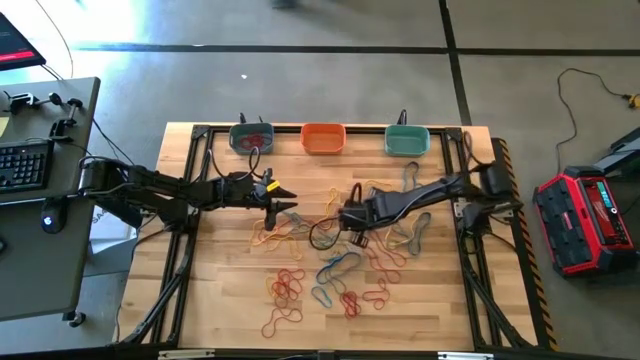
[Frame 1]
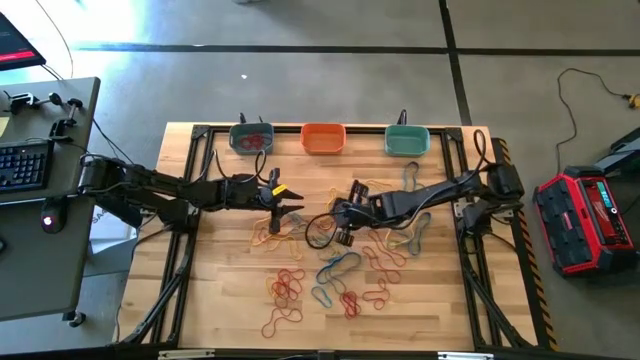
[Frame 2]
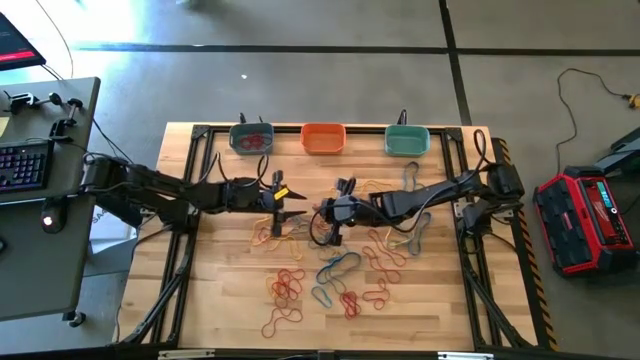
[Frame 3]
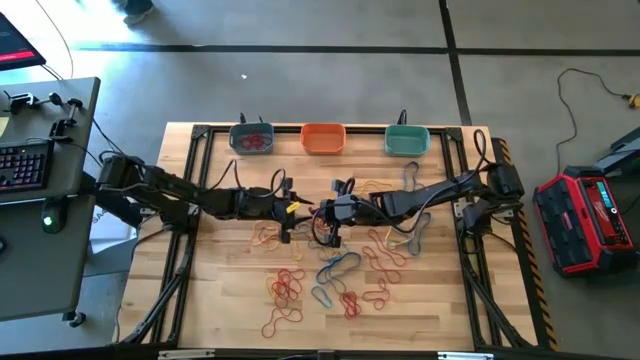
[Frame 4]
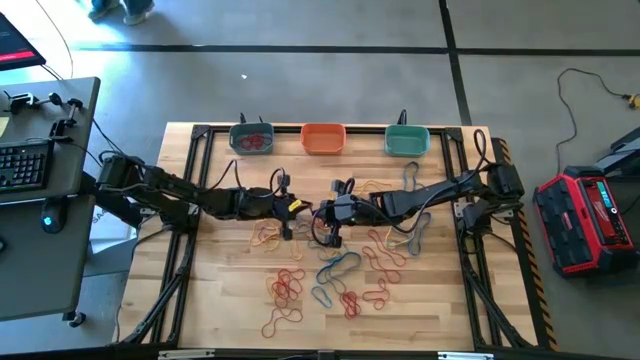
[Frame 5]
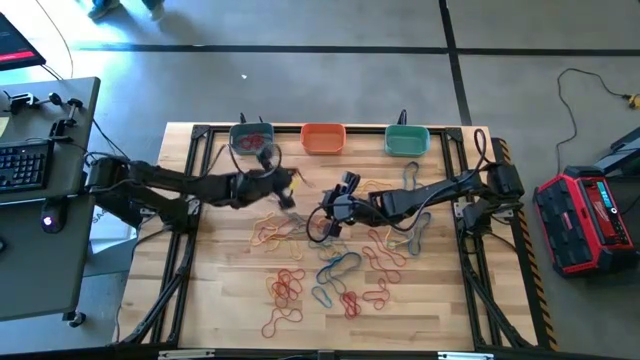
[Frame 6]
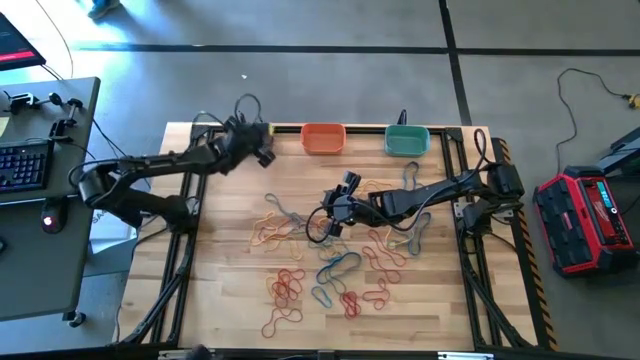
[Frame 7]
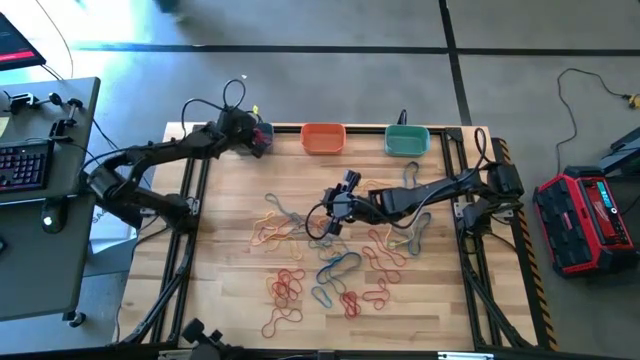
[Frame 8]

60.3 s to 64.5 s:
Task: Sort rubber bands into baskets
Put the red rubber band into the blue bin

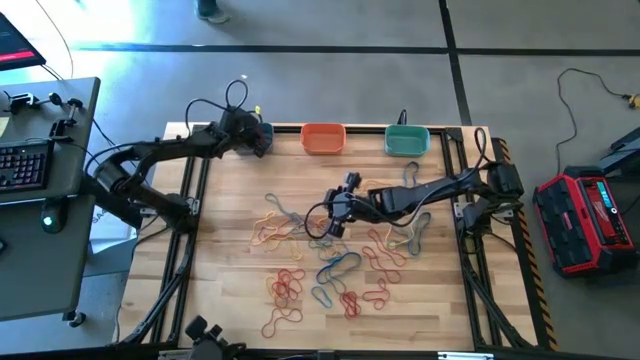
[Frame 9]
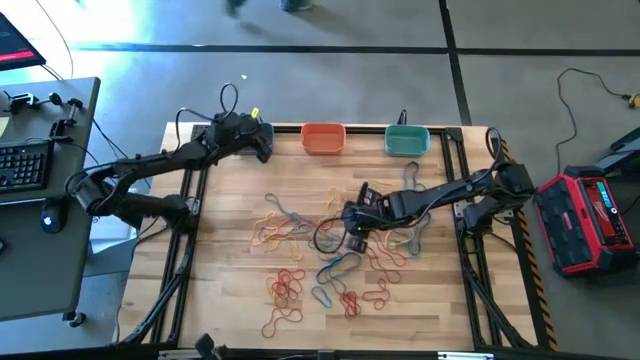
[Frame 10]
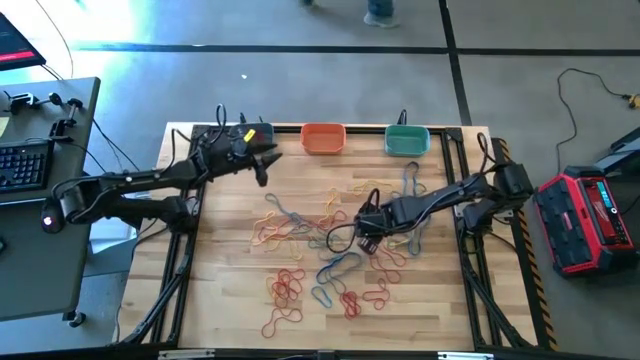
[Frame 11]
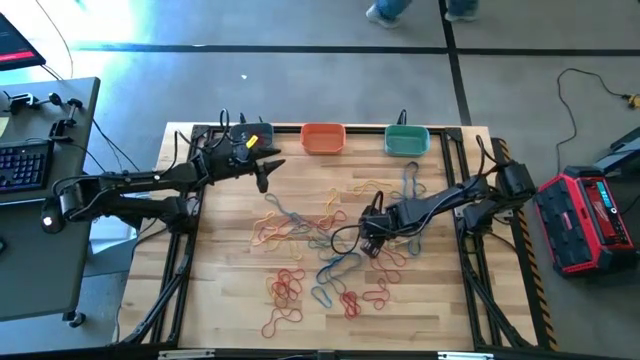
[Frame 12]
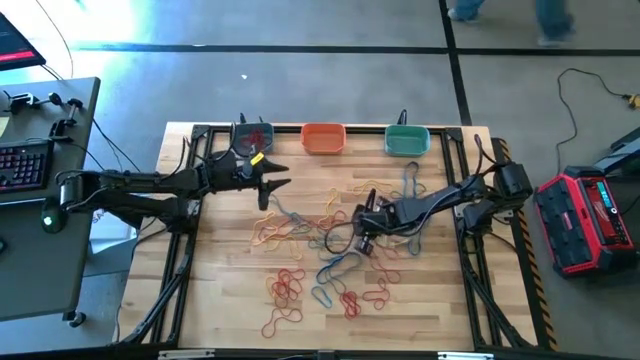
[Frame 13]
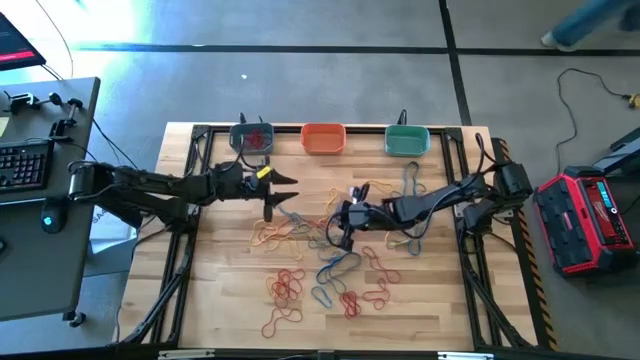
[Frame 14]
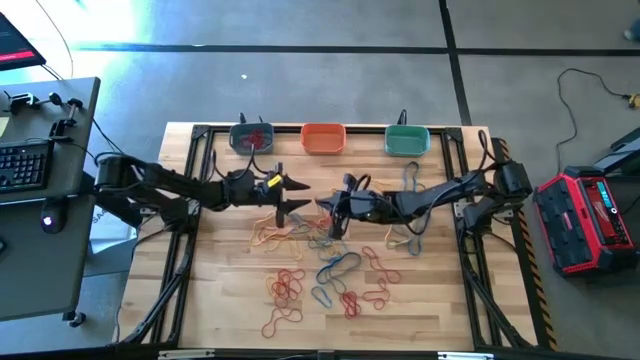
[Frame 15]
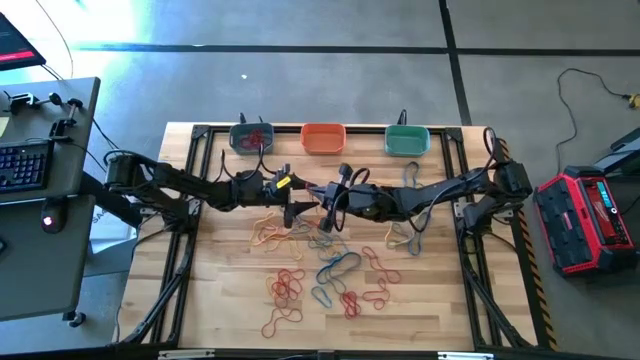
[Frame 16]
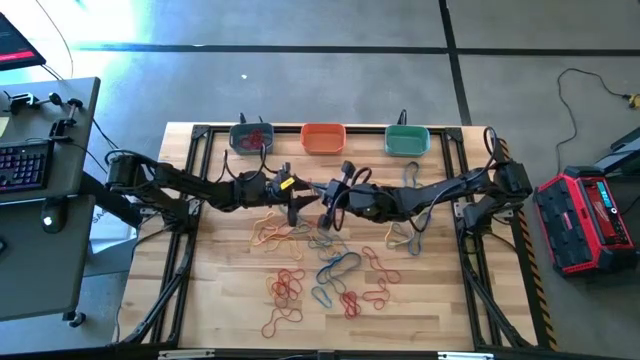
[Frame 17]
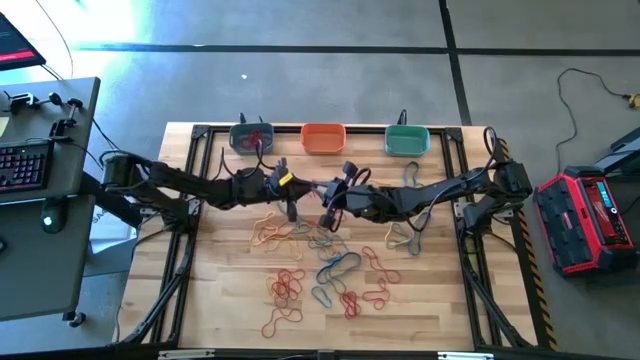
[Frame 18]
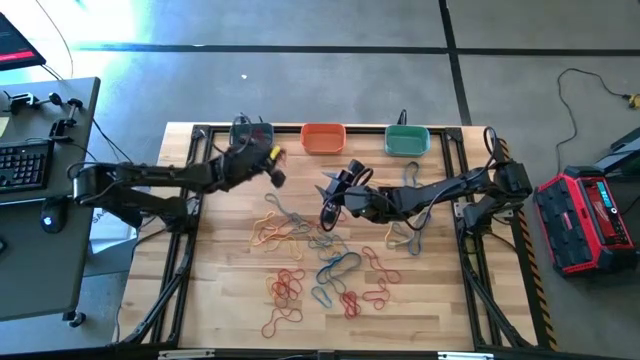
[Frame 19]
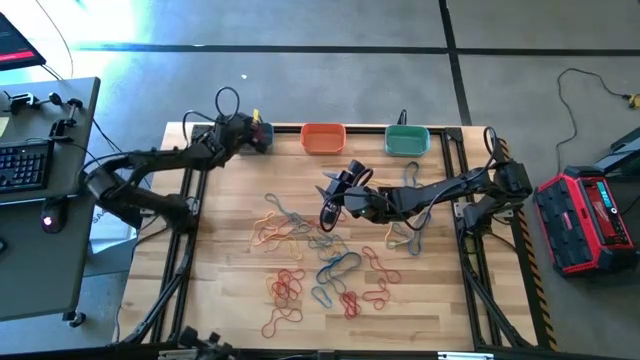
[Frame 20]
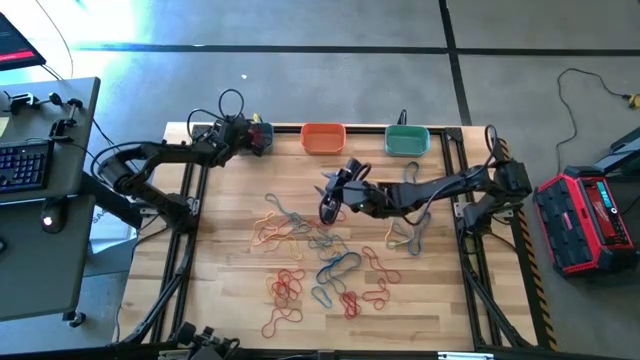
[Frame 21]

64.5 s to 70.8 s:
Put the red rubber band into the blue bin

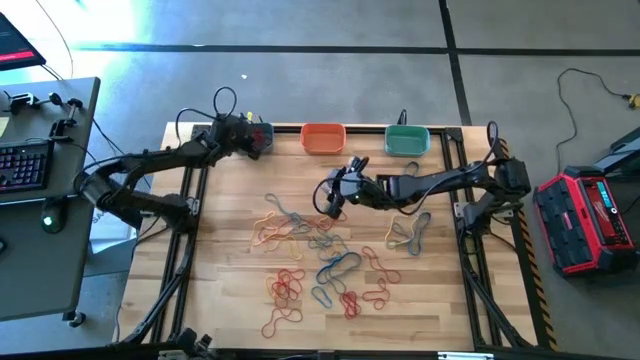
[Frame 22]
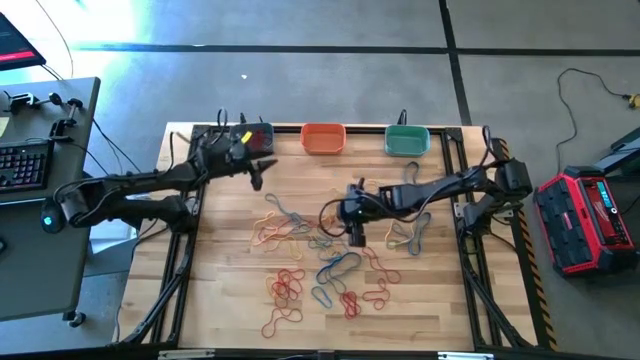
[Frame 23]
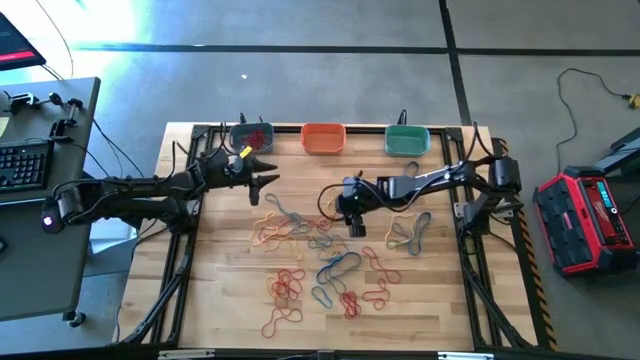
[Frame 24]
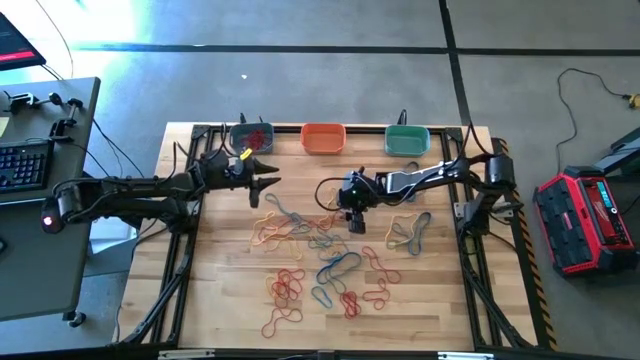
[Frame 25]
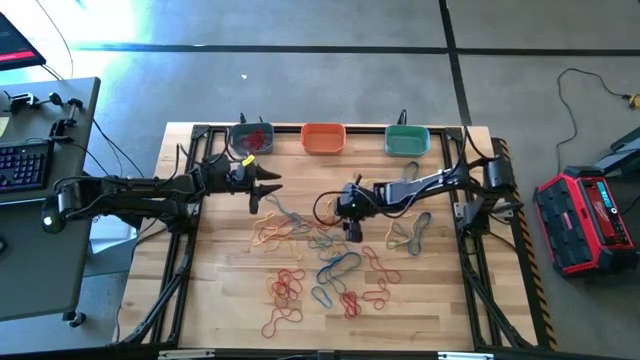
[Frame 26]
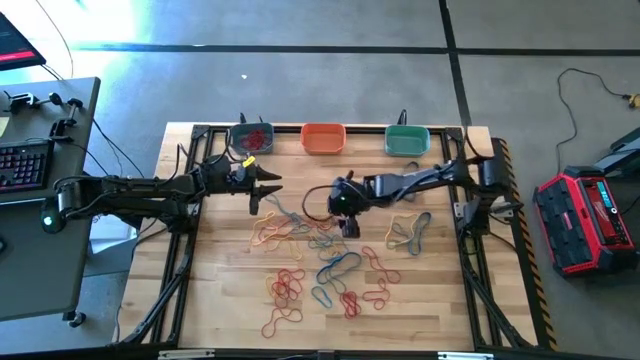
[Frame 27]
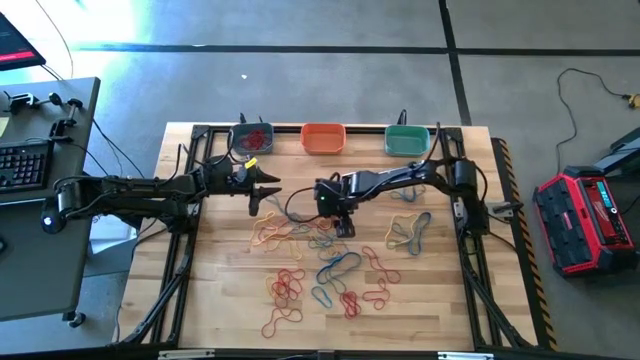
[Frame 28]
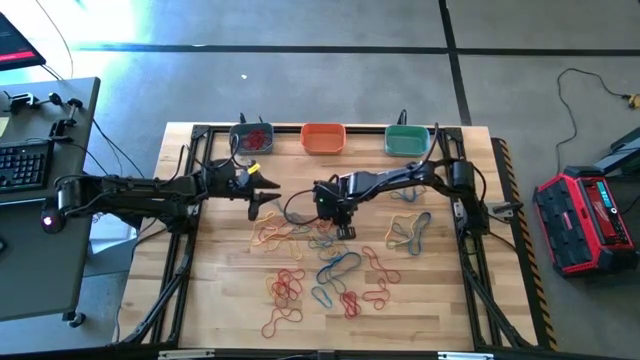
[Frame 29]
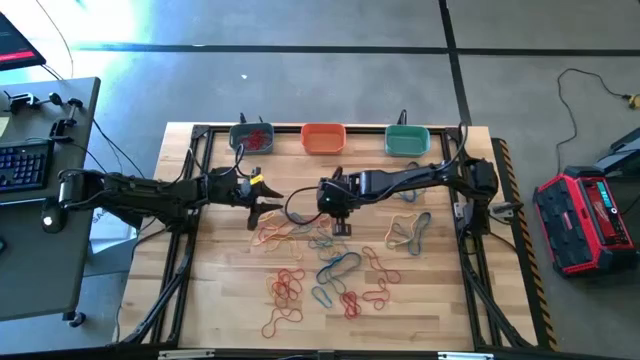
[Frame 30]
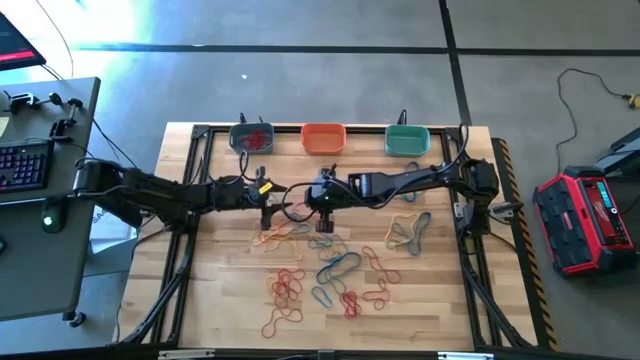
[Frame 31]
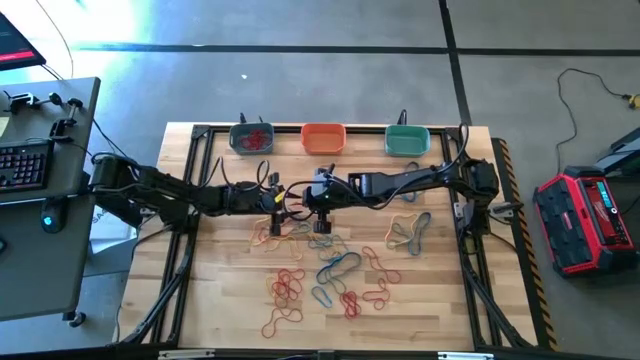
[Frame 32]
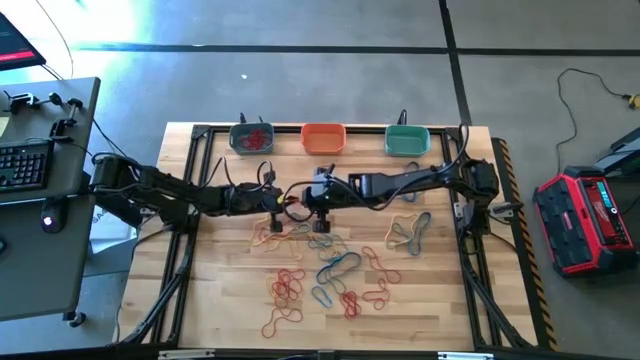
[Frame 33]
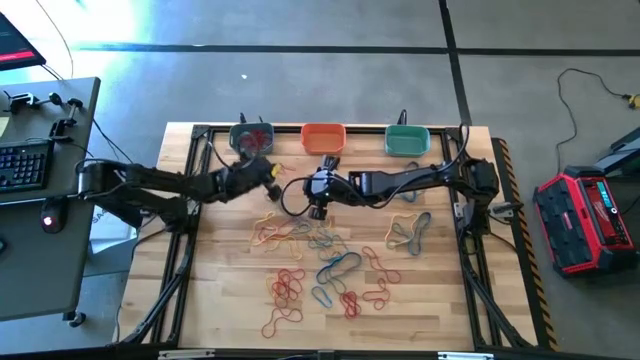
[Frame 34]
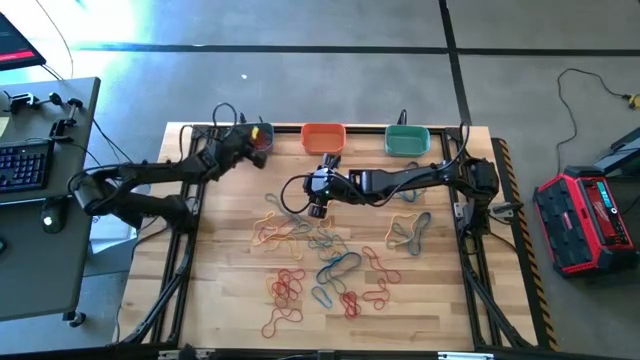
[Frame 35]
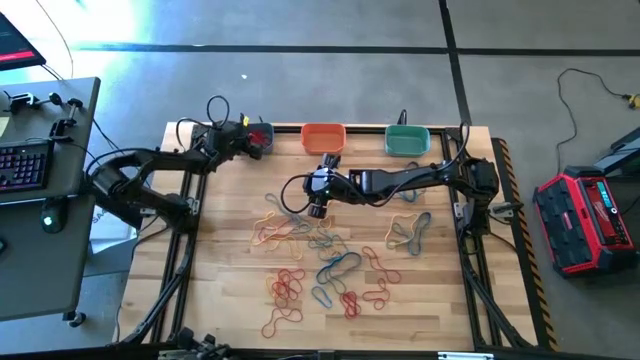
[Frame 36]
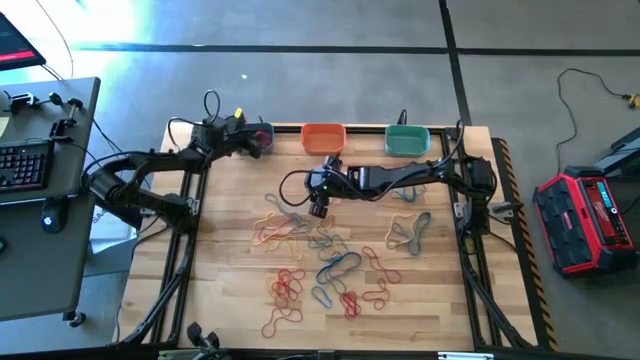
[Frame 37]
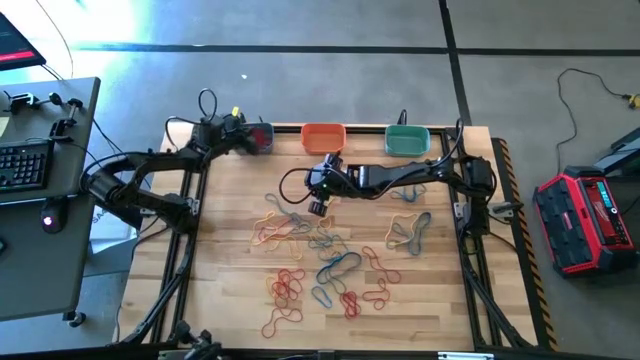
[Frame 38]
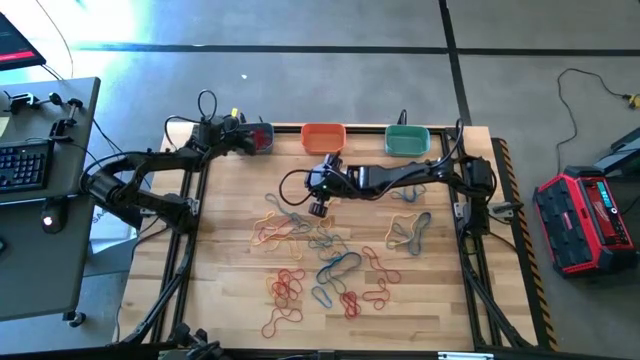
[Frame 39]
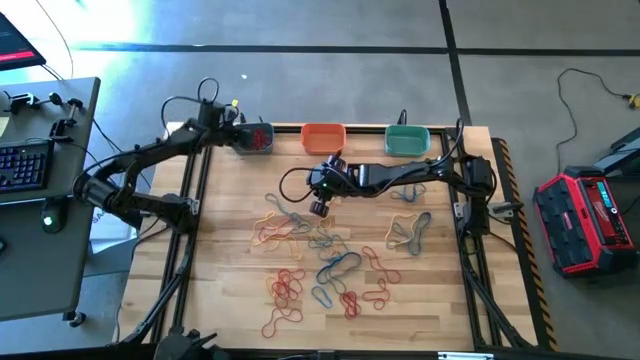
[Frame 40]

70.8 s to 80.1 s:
Put the red rubber band into the blue bin

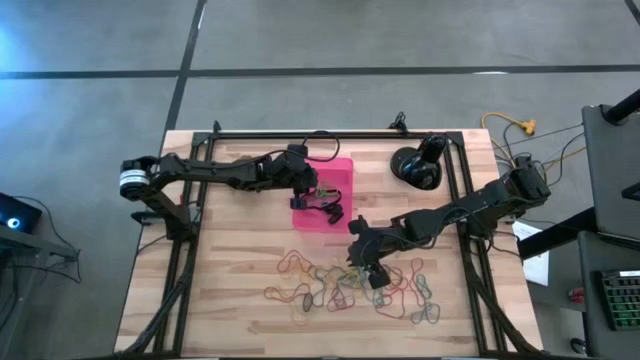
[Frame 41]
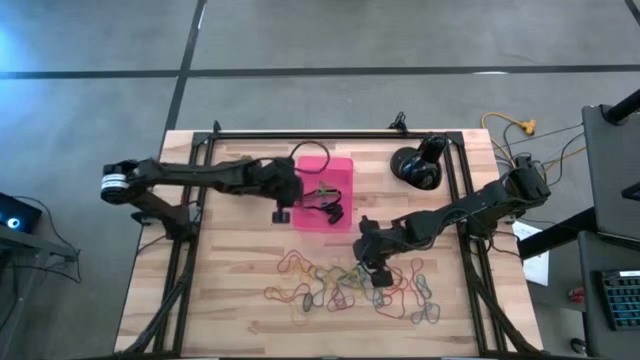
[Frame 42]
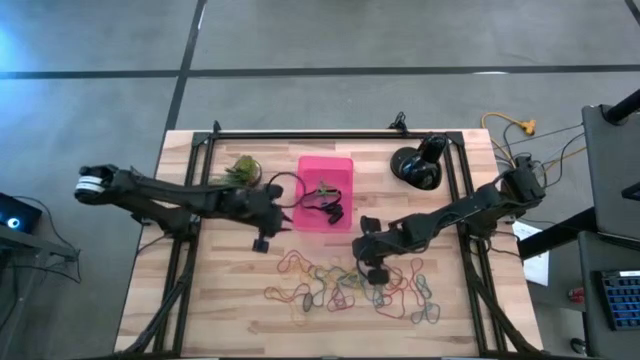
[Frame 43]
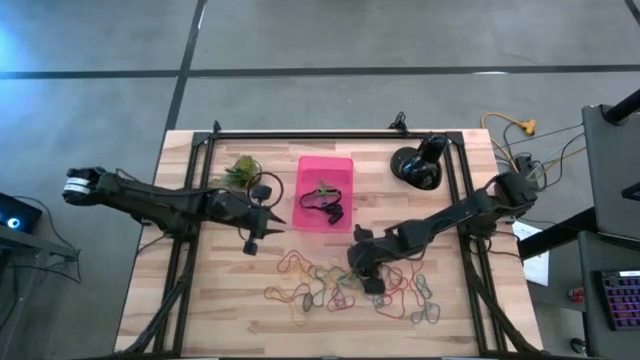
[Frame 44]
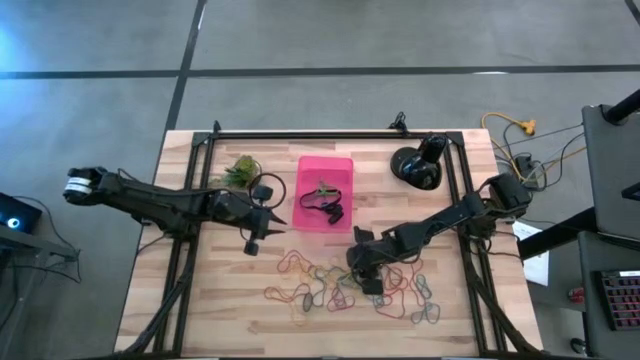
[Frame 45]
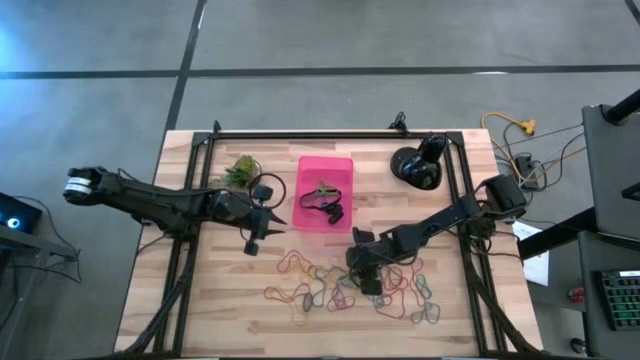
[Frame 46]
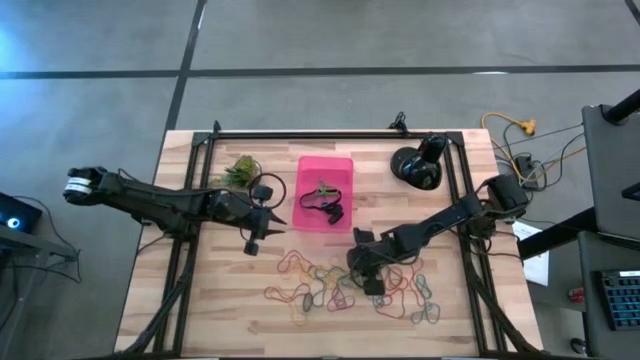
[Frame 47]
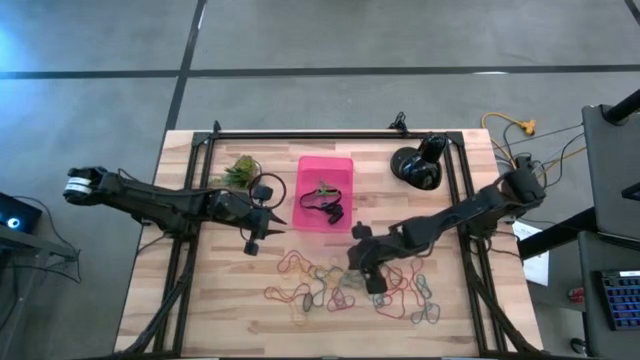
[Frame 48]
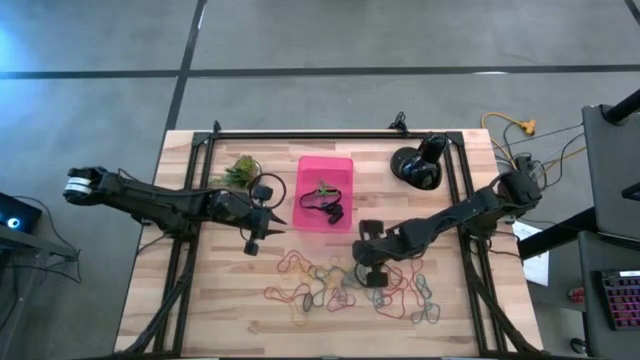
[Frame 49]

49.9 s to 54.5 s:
Task: Pick and place rubber bands into bin
Put the yellow rubber bands into the pink bin
